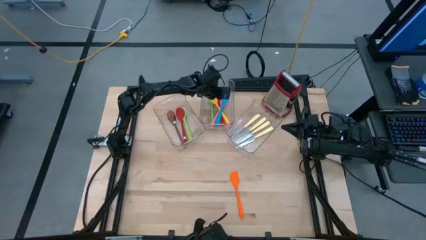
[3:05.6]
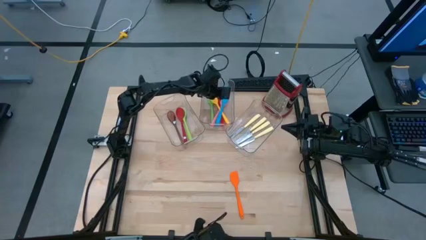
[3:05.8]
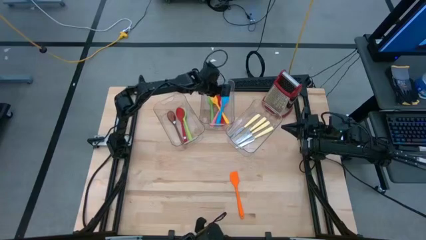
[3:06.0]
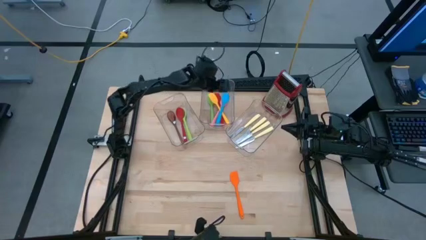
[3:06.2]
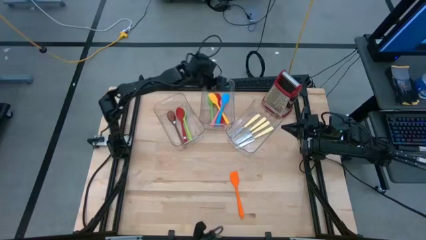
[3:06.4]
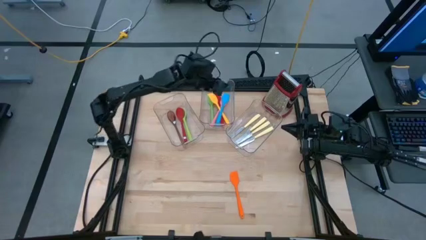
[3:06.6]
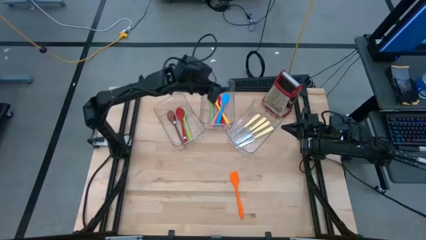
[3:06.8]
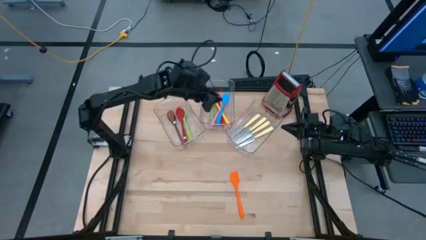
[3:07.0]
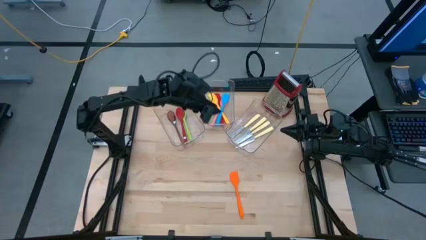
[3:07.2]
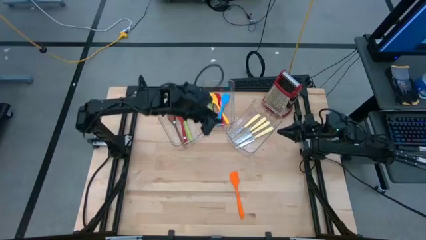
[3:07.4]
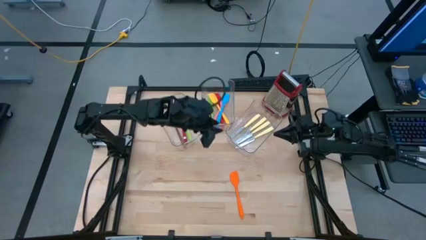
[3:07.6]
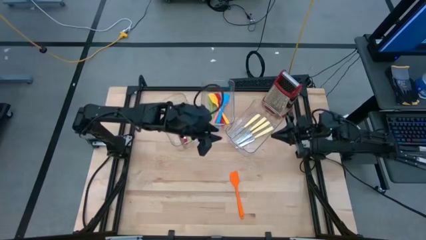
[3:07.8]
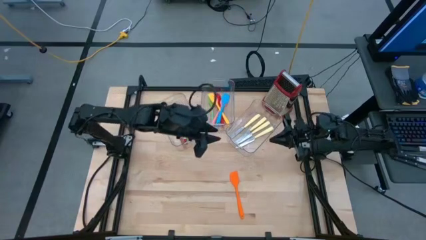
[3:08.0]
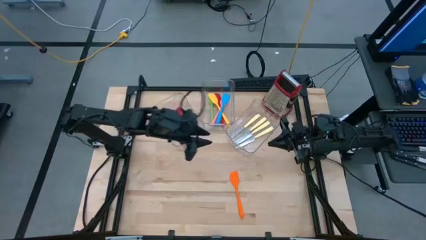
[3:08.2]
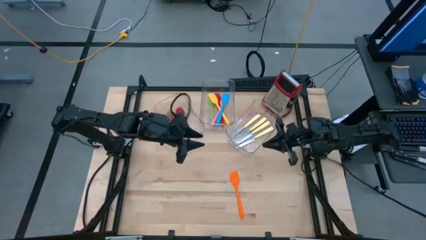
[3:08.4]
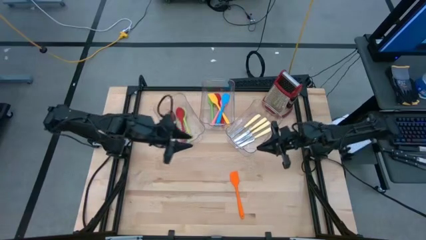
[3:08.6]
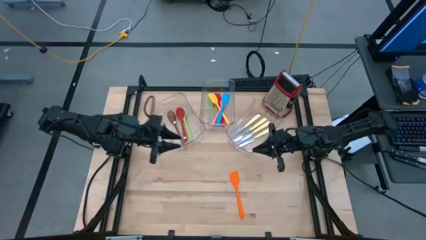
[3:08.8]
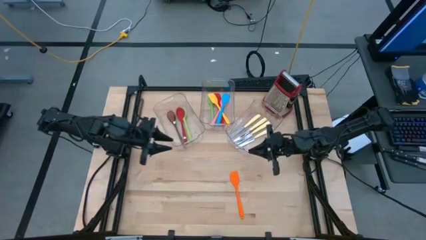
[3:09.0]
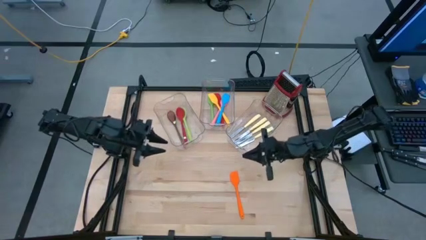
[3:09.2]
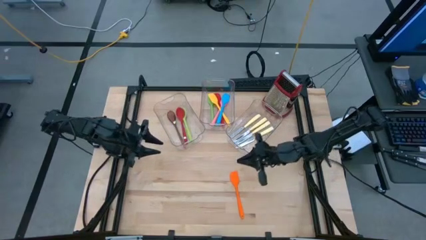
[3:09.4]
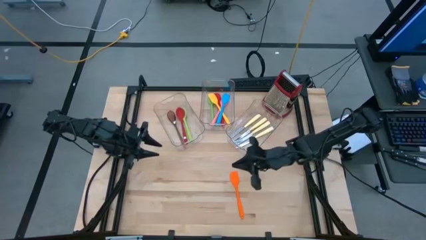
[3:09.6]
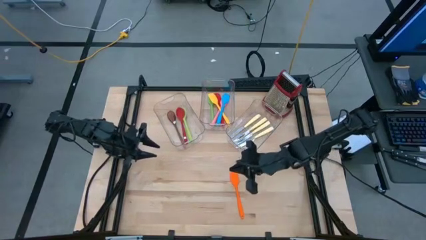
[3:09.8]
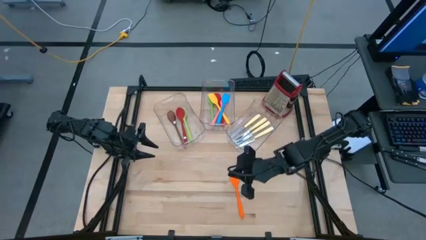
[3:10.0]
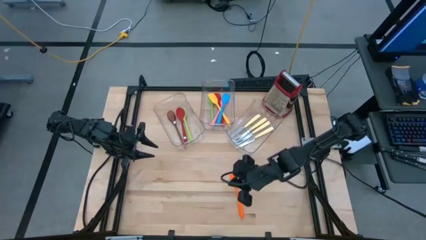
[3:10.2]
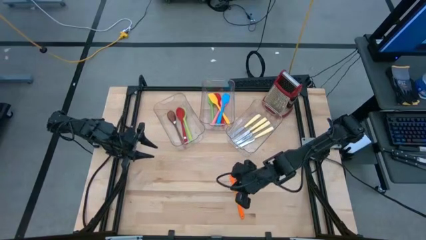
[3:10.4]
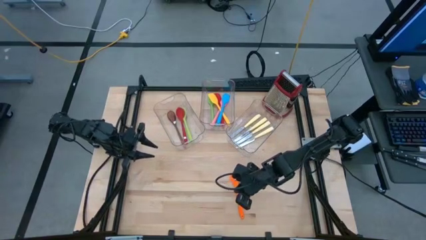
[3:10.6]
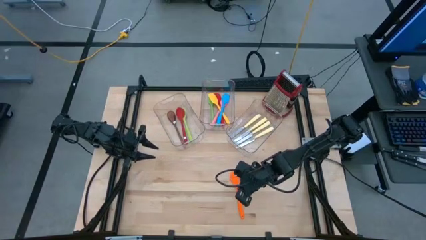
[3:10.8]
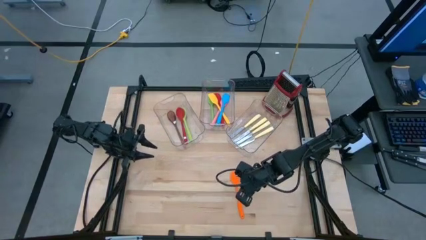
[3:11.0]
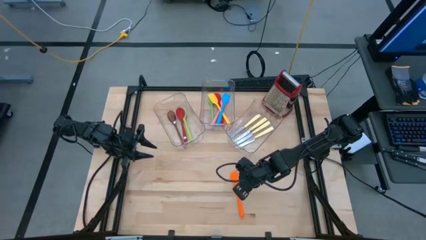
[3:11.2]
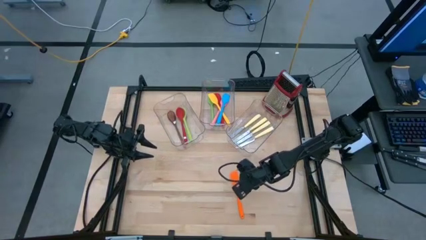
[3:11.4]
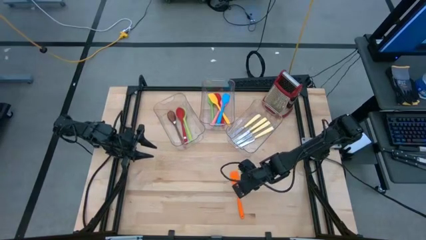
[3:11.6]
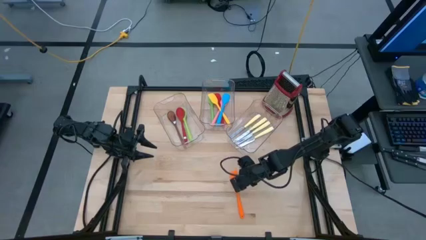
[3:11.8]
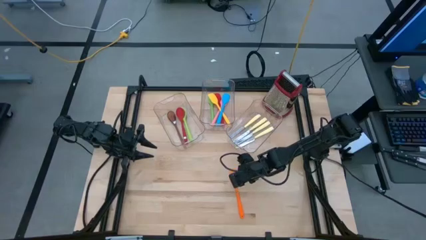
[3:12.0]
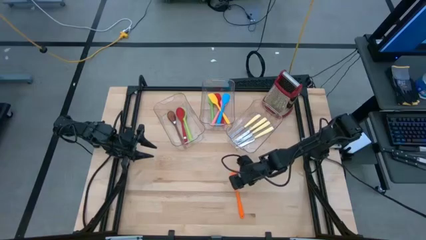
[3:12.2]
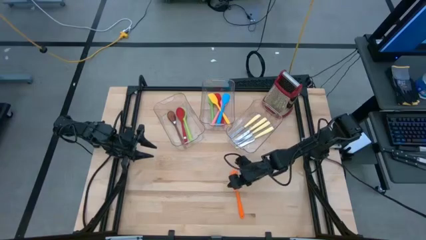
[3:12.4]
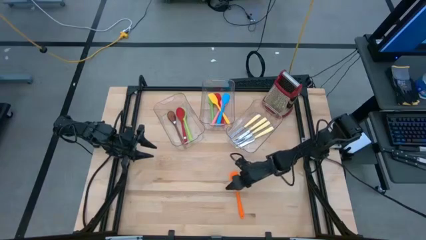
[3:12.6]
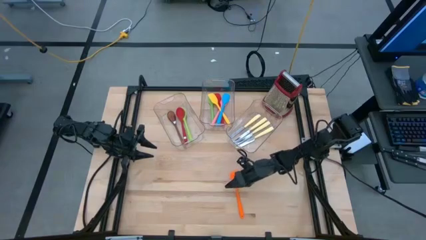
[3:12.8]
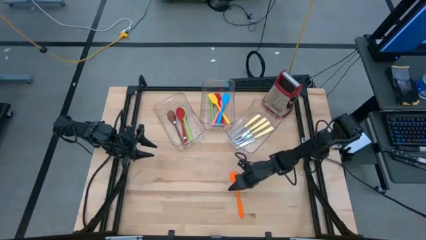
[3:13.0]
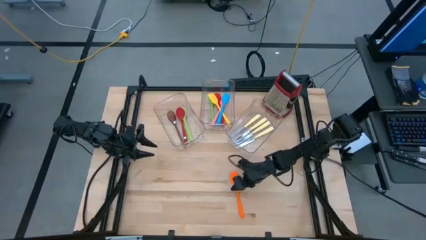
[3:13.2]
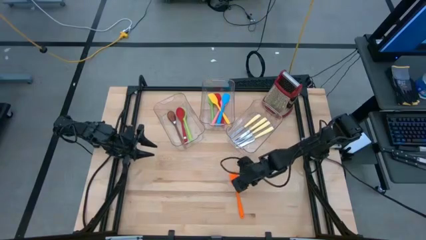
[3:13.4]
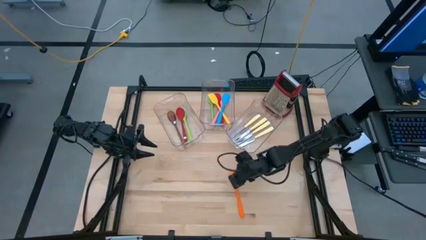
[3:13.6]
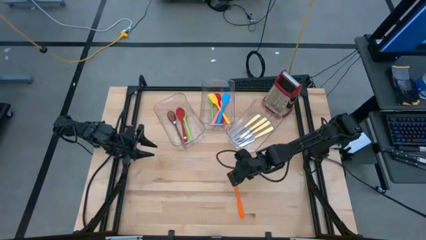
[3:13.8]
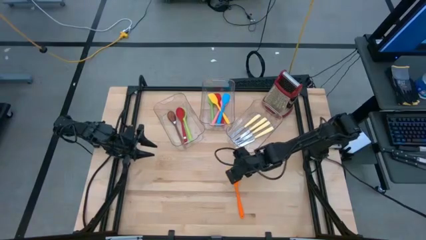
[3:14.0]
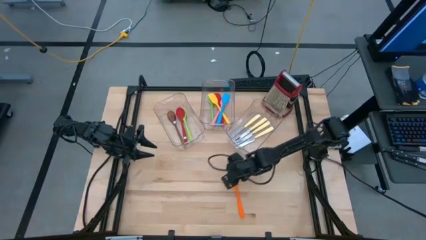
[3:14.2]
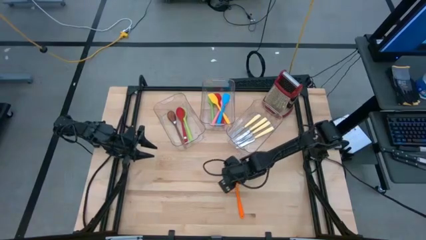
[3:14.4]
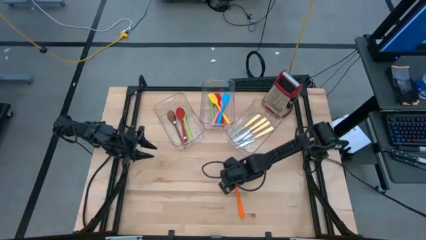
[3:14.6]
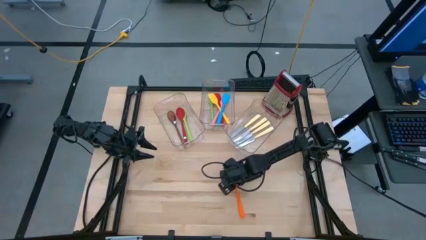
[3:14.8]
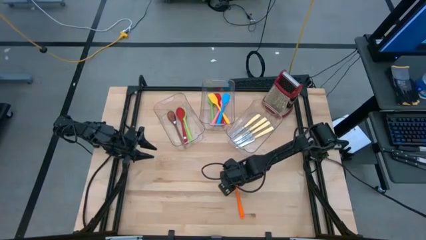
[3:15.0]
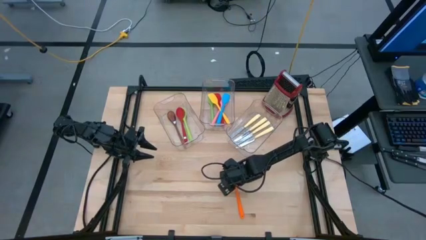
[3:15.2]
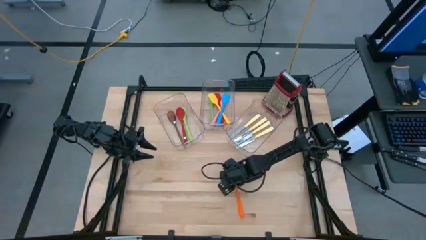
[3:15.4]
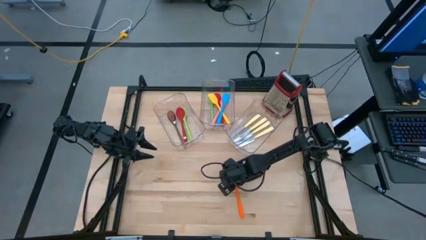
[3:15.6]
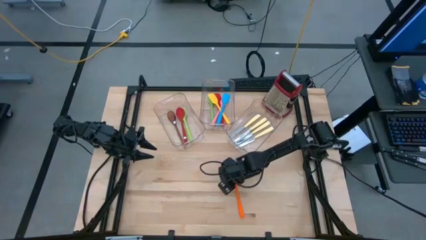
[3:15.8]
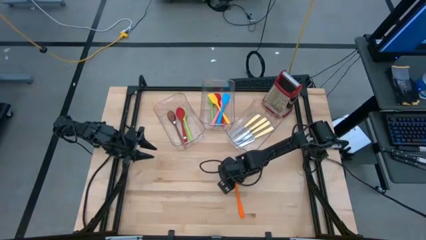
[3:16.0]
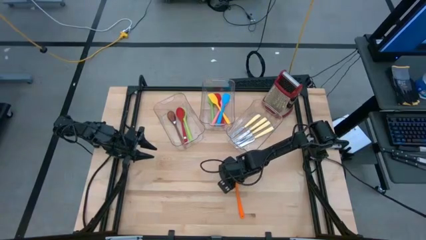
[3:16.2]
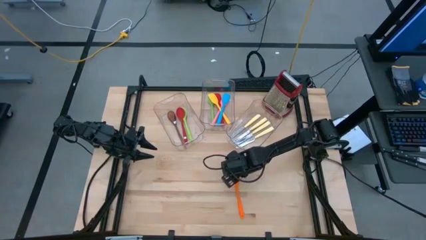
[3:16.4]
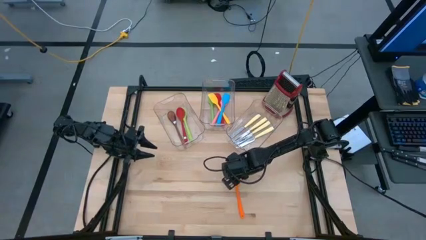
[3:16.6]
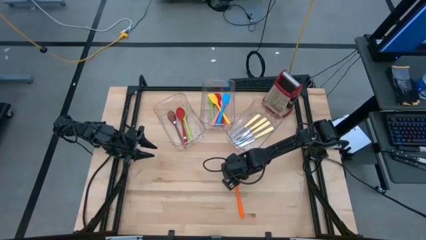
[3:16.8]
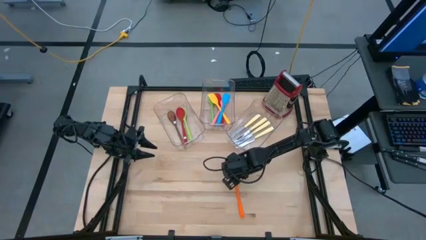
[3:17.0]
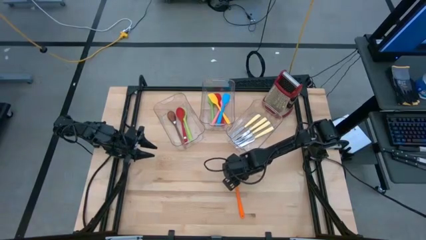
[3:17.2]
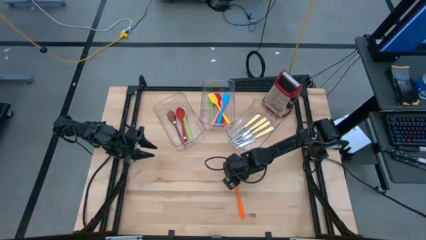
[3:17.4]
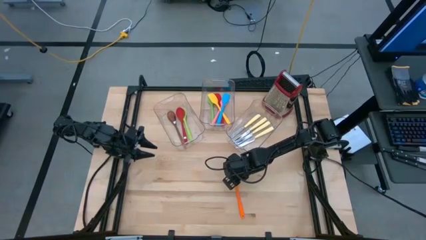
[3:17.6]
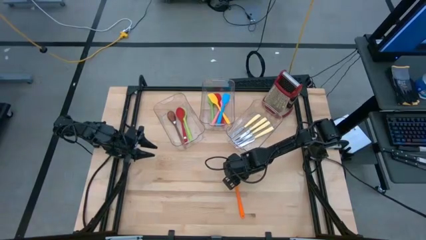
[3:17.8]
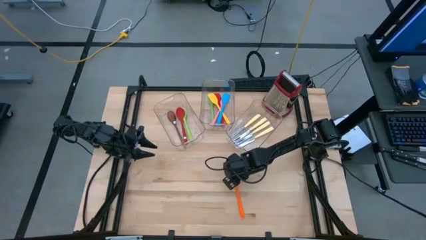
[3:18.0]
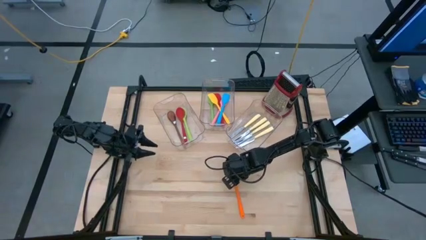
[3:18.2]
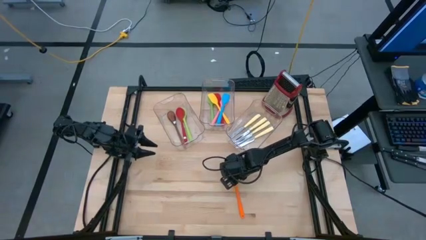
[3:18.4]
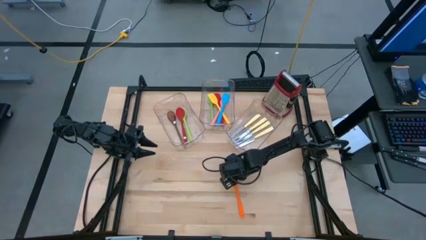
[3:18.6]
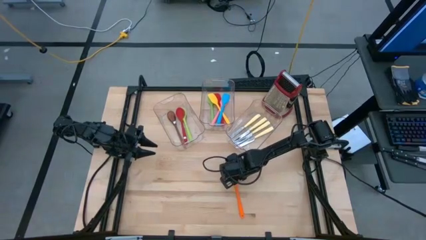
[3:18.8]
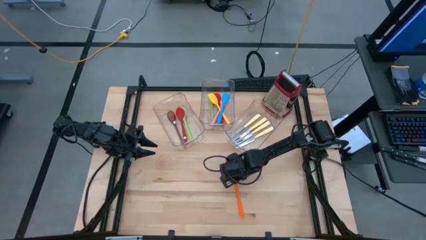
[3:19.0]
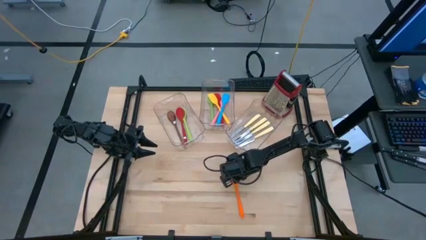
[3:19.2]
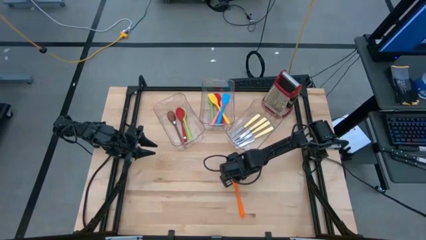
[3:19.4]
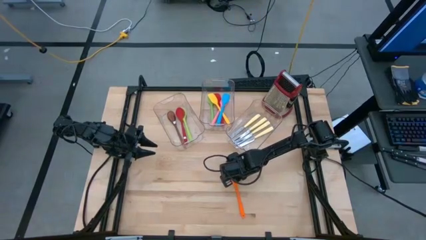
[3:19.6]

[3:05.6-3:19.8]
Task: Pick & Place Kitchen Items
Put the orange spatula into the middle transparent bin

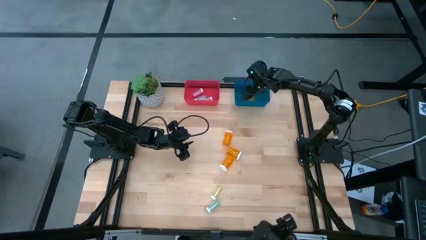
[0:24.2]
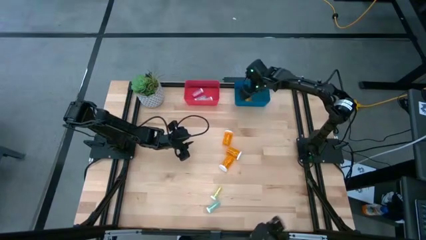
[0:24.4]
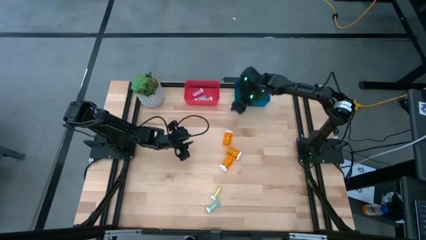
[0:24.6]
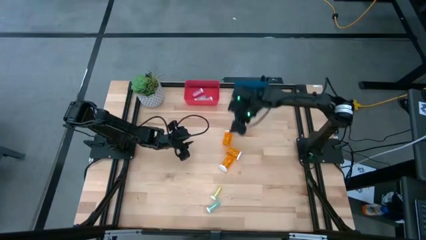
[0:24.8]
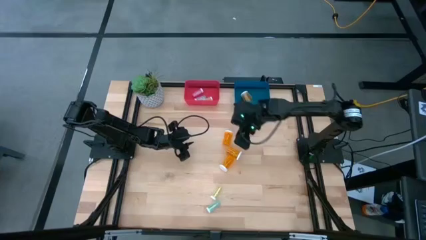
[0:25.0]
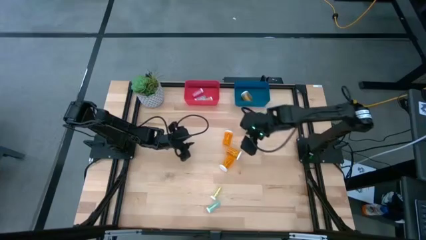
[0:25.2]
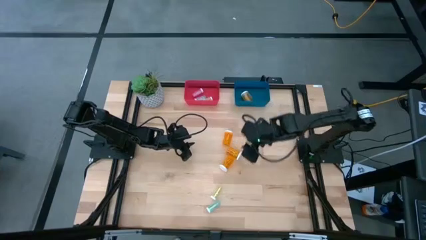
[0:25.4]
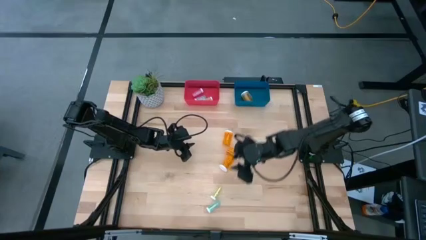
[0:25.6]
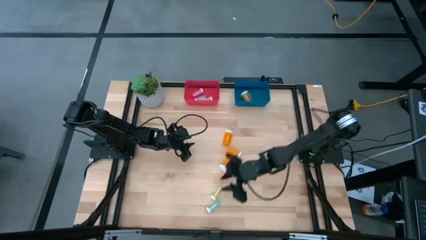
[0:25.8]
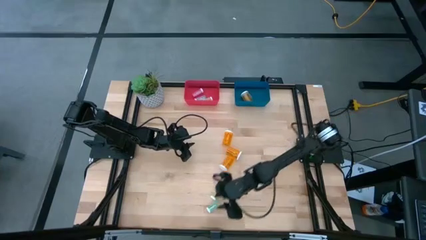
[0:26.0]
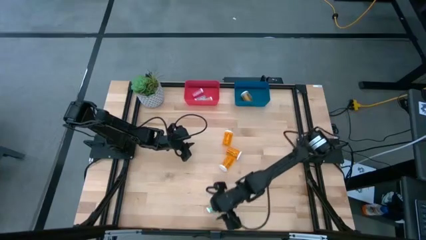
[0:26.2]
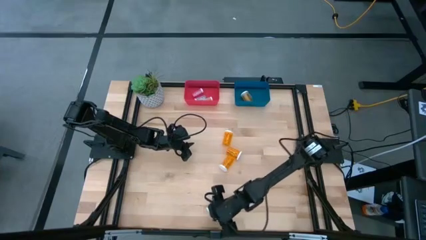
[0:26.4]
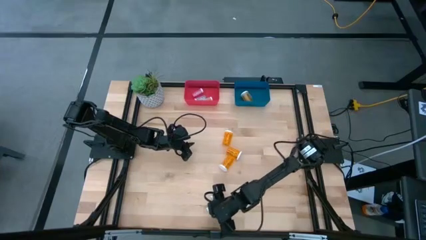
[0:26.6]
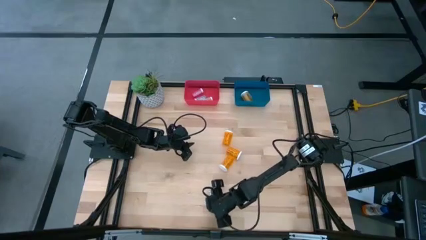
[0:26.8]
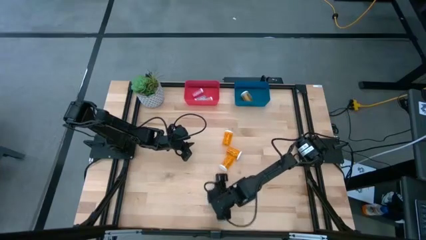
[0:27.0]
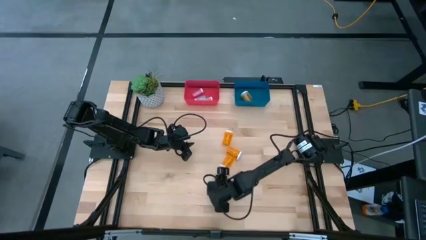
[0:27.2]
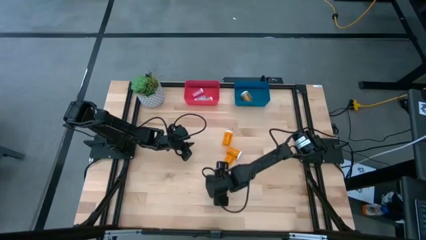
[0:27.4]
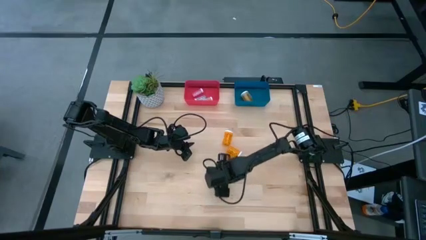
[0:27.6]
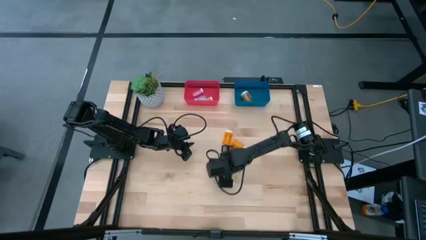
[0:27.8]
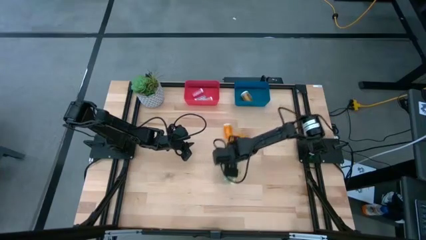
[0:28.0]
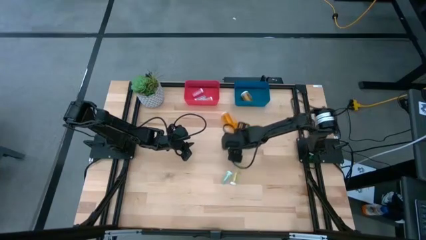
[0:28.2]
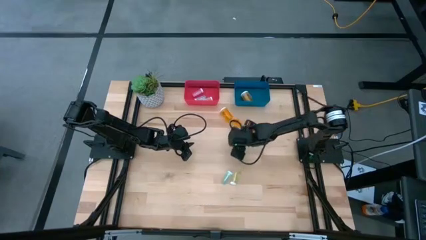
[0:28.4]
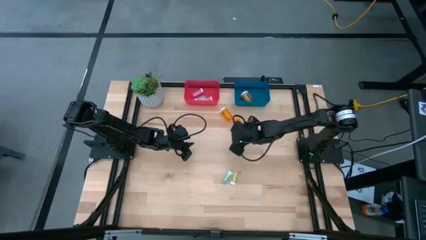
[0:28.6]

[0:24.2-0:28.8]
Task: Pick and place medicine bottles into bin by pill shape (circle, oval)
Move the orange pill bottles to the top right of the table
